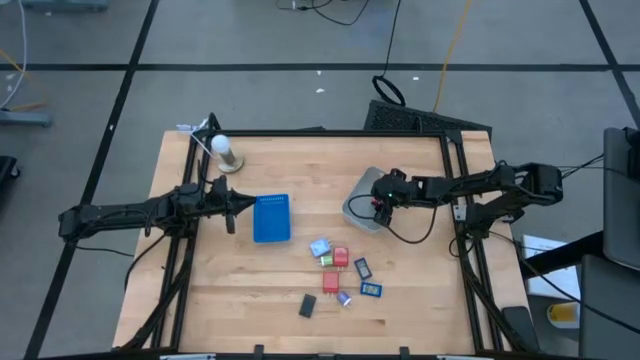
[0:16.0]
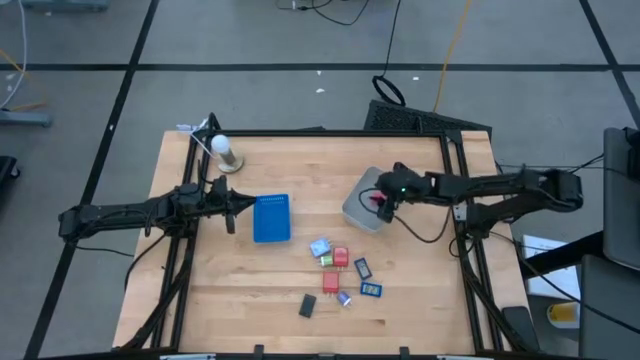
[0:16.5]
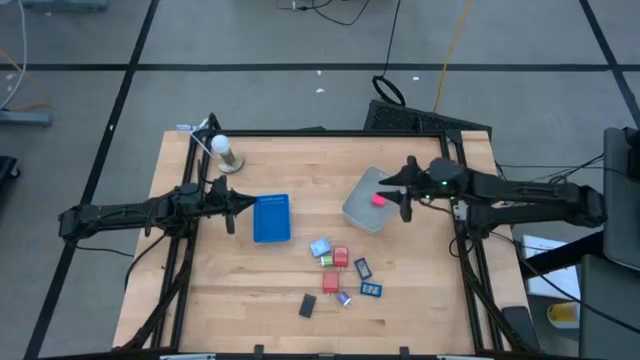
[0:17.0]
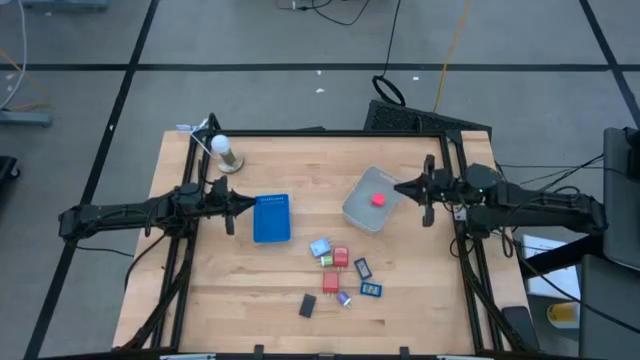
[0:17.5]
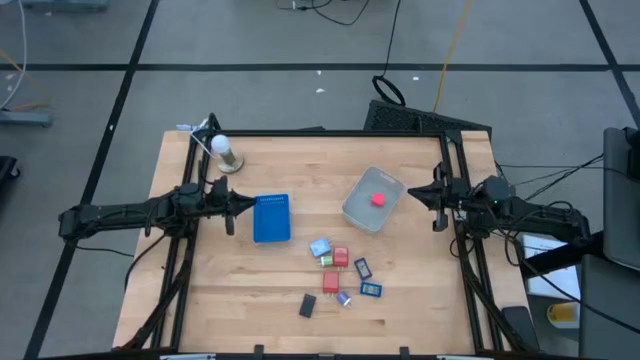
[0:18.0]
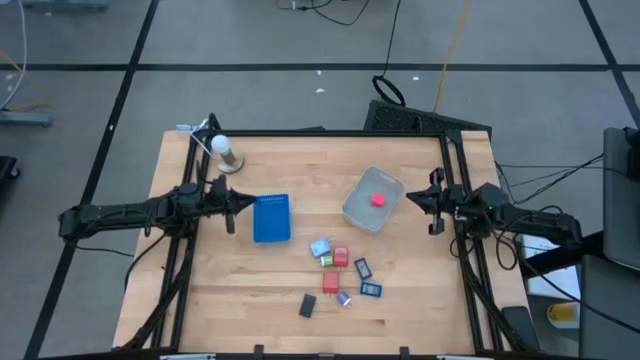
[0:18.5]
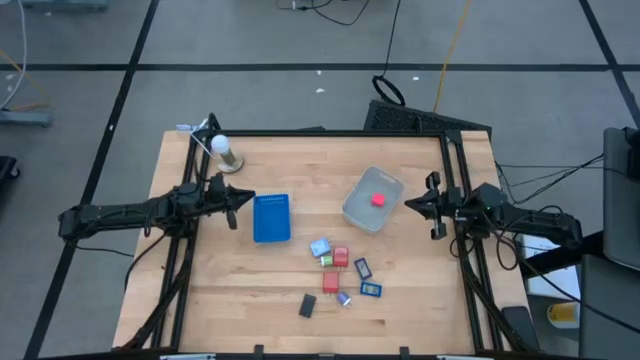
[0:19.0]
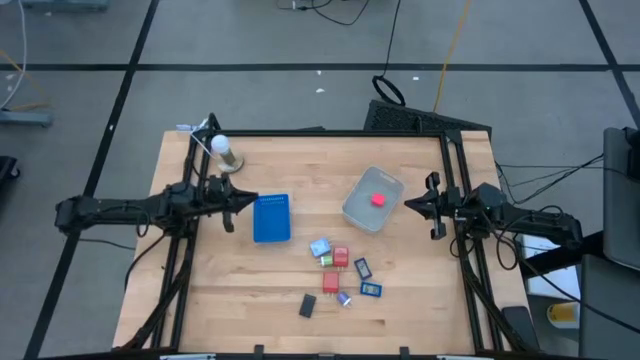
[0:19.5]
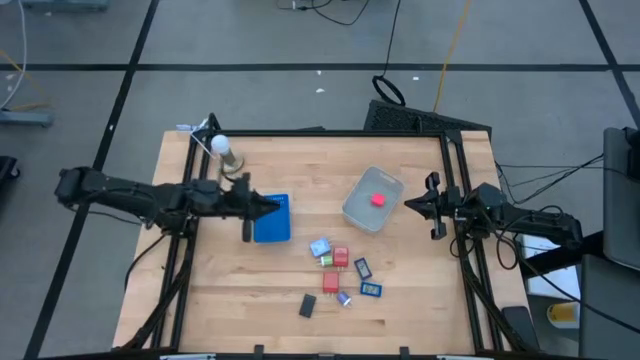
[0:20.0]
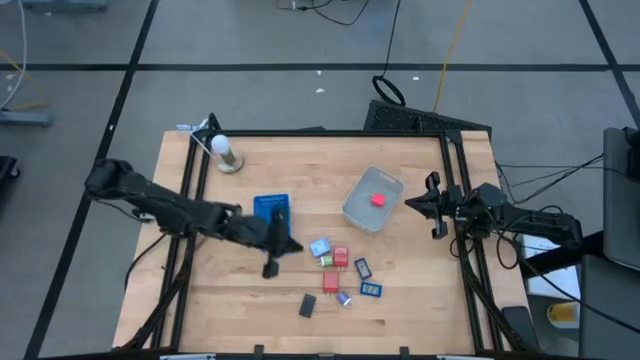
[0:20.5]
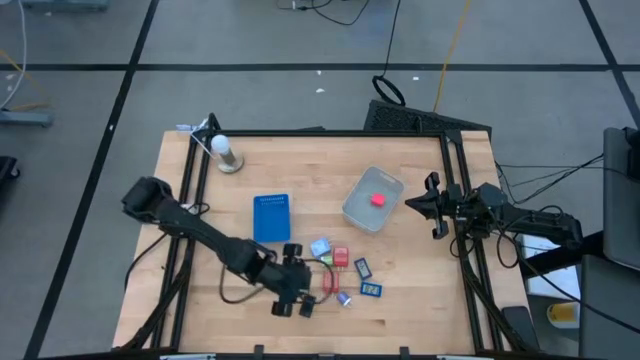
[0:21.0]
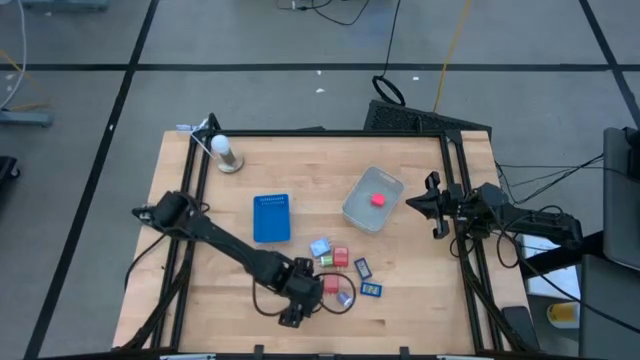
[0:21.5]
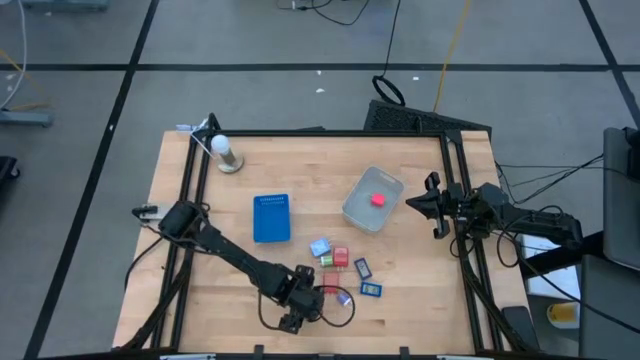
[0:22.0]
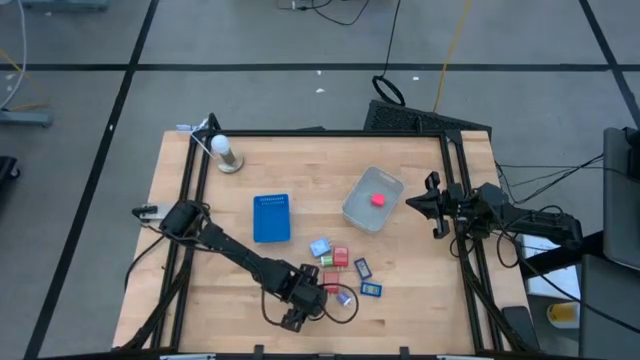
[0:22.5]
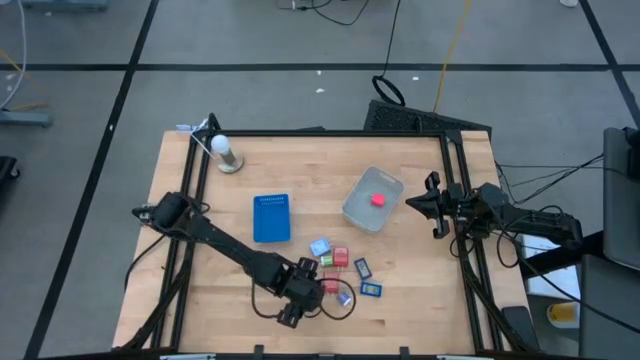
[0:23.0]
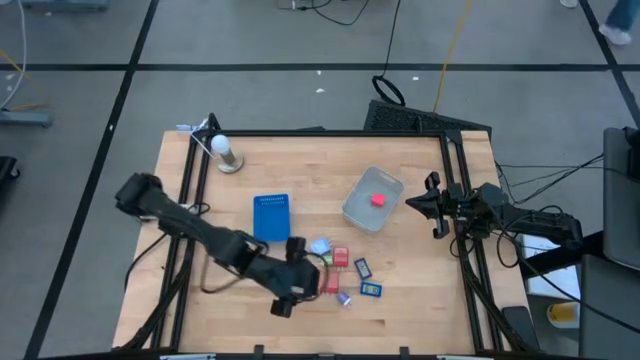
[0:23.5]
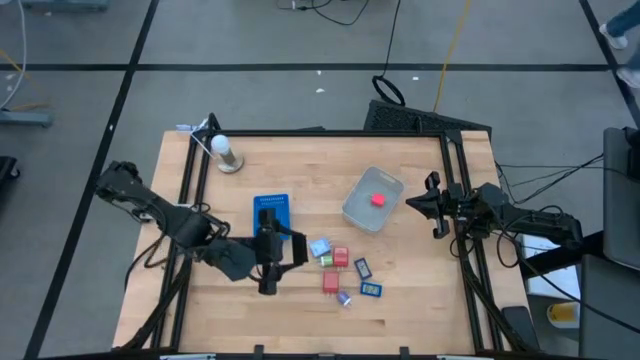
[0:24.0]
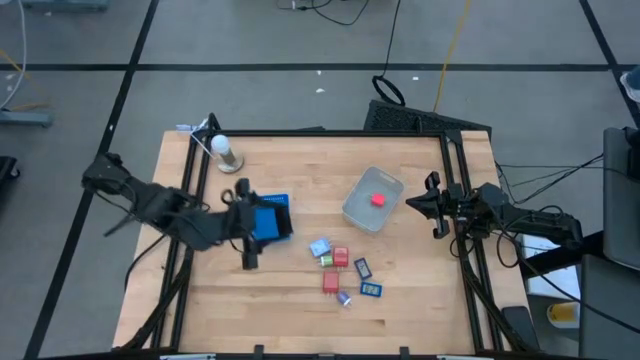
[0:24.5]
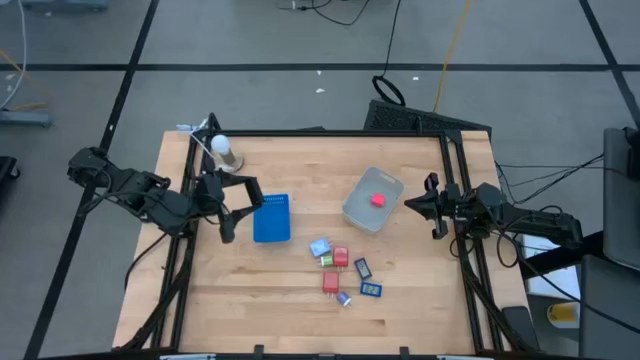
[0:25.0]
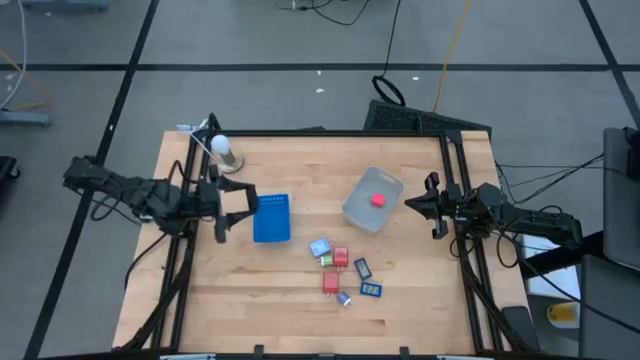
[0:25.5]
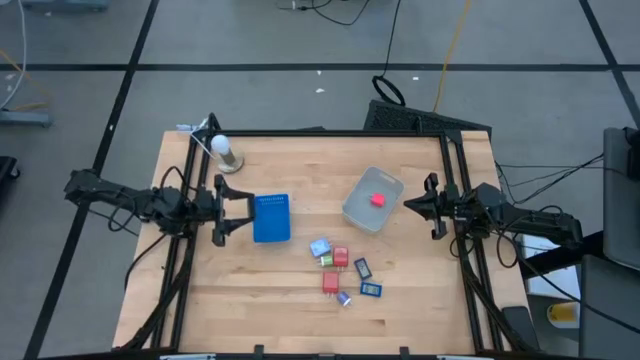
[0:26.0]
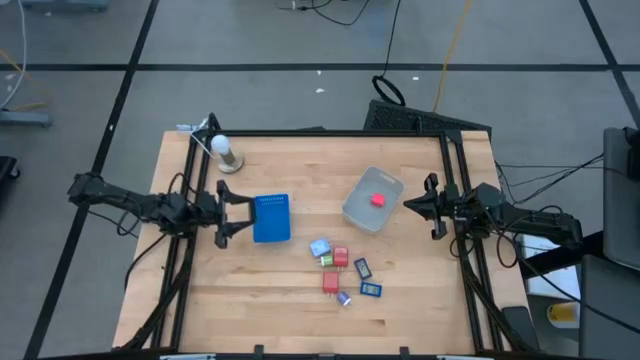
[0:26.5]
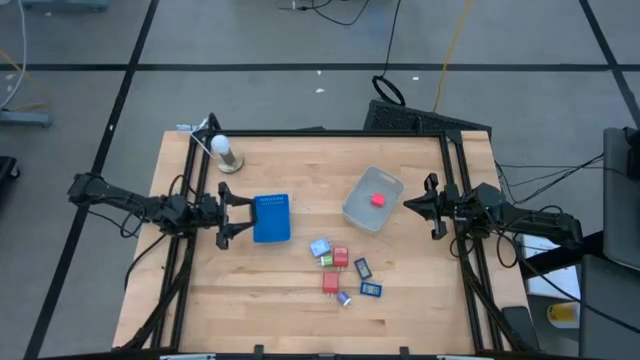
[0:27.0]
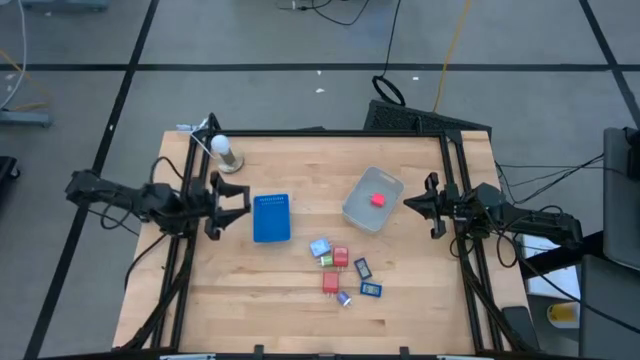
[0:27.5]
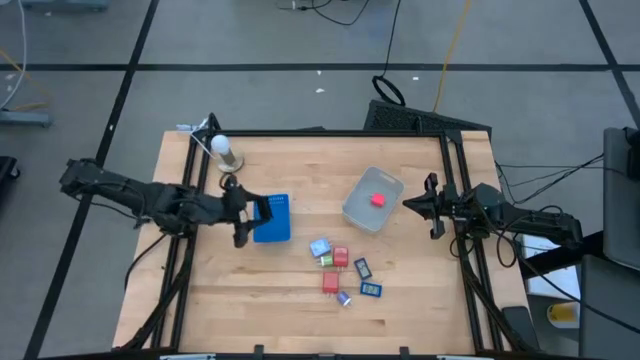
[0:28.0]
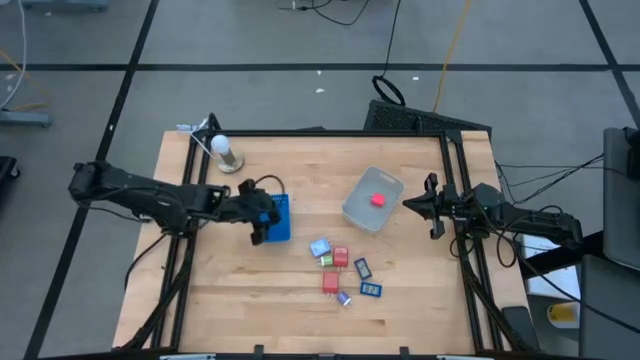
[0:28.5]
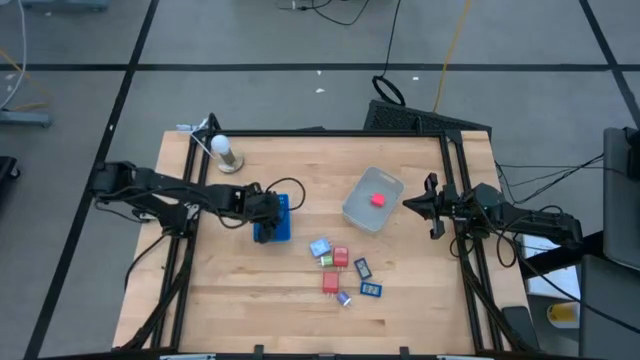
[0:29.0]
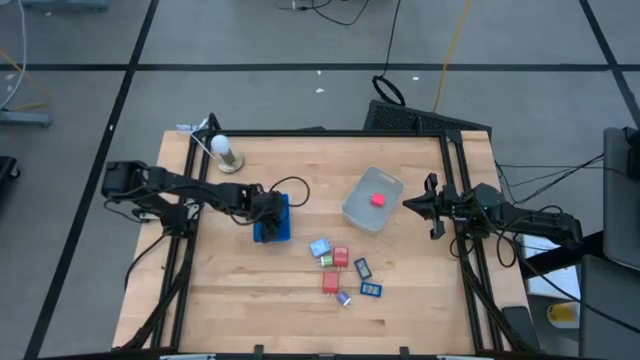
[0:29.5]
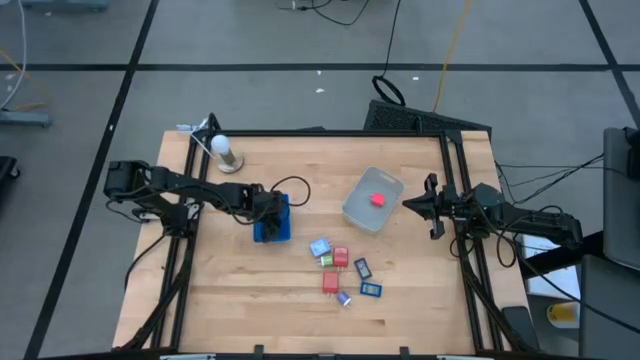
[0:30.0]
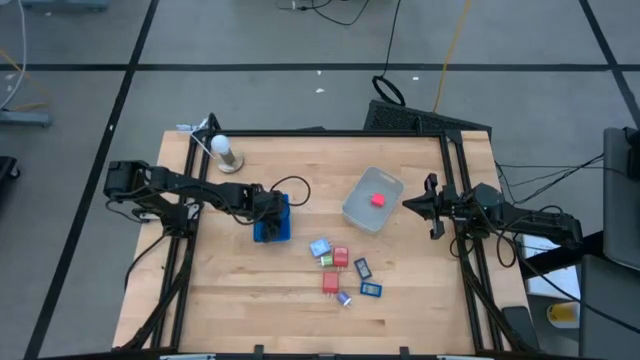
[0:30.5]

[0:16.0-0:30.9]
Task: Pick & Place Office items
Put the black digital clock into the blue bin

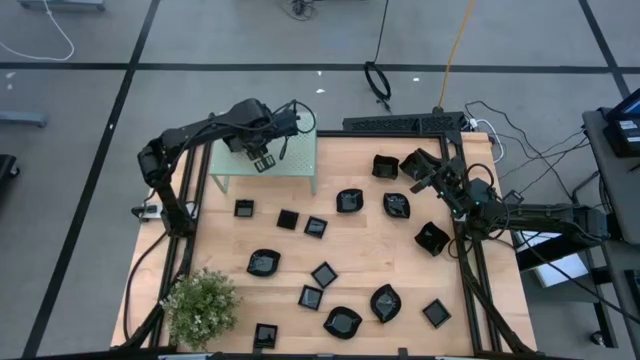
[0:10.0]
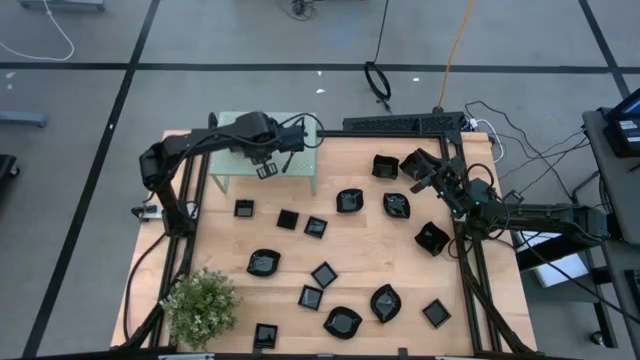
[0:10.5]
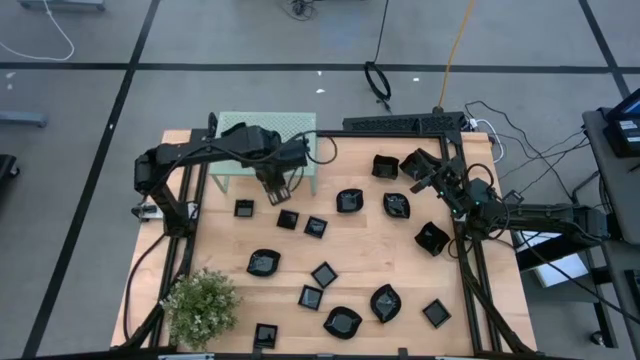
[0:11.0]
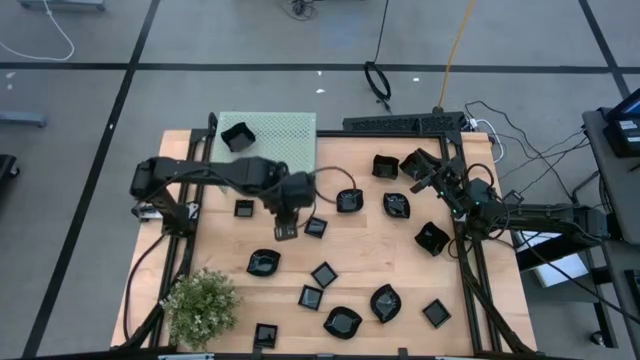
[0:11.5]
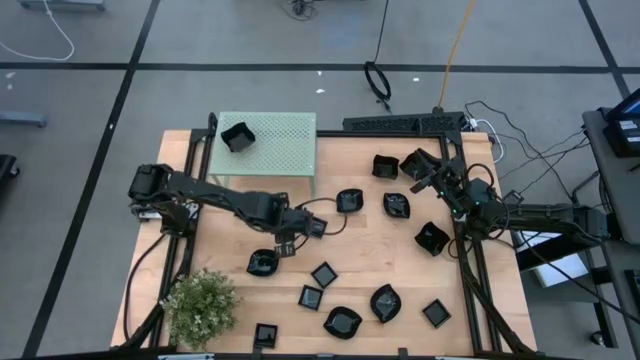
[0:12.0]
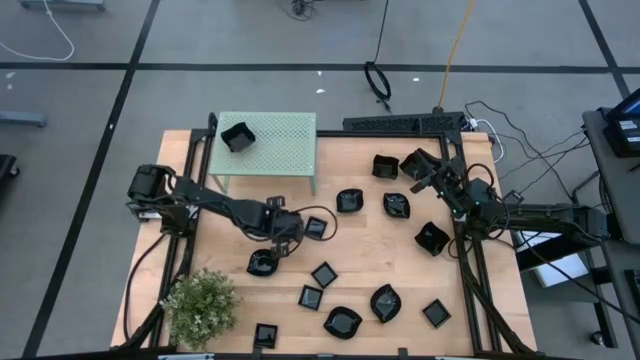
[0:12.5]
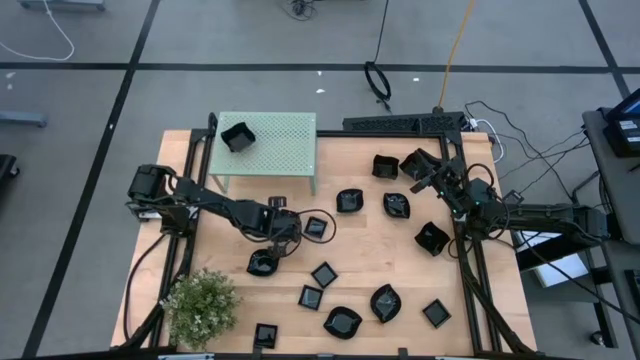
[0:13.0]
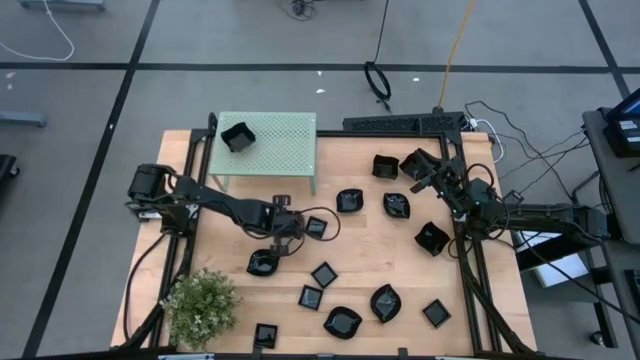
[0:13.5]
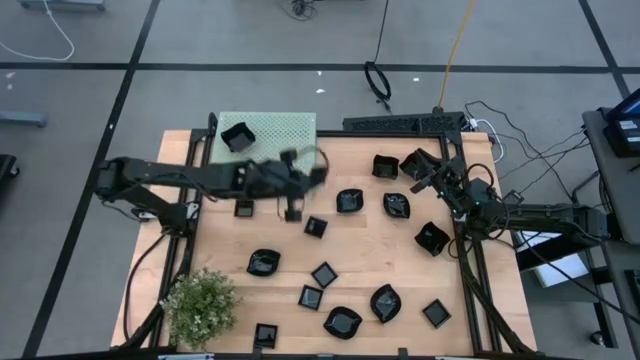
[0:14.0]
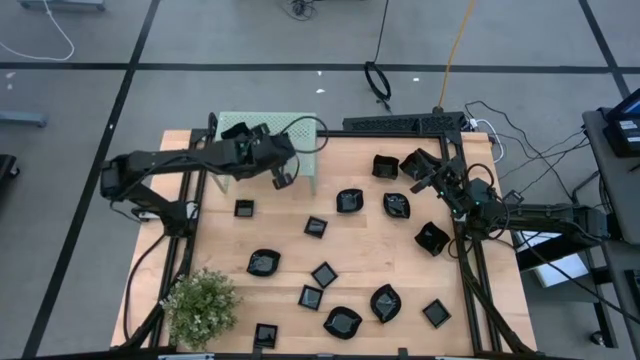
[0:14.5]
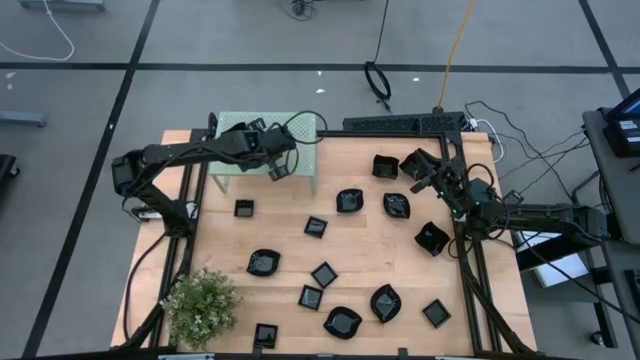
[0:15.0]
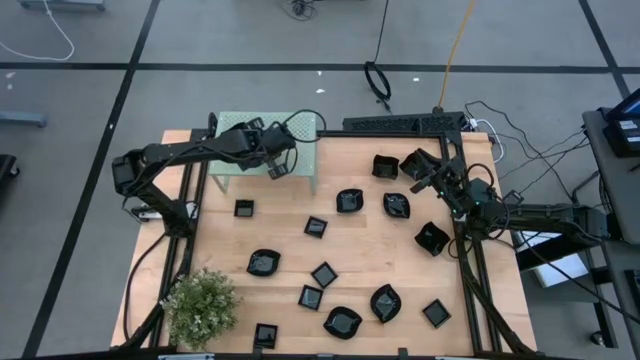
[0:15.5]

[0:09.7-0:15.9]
Task: Pick & Place Mini shaped plates
Put the square plate on the shelf
